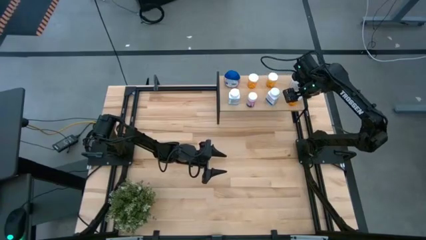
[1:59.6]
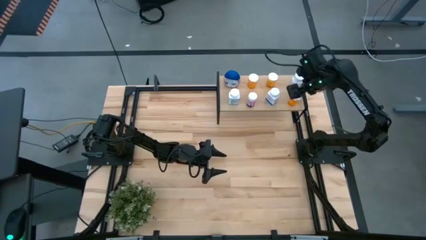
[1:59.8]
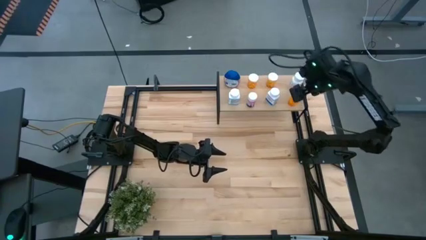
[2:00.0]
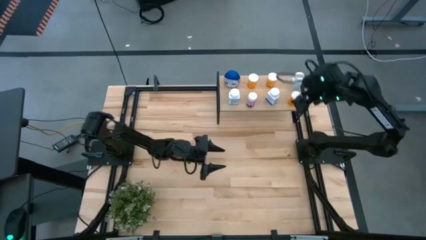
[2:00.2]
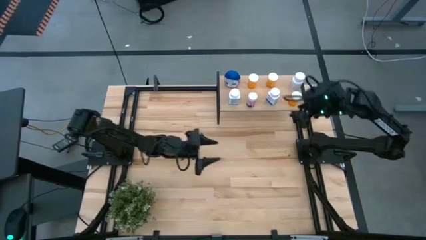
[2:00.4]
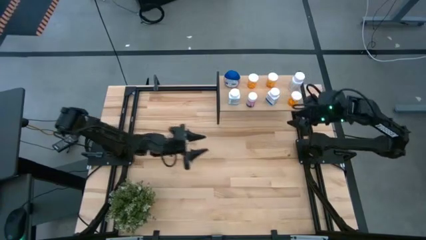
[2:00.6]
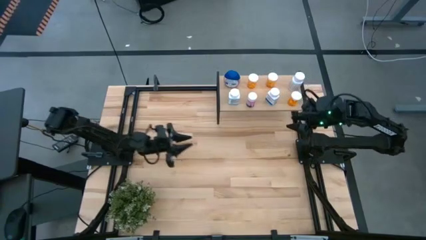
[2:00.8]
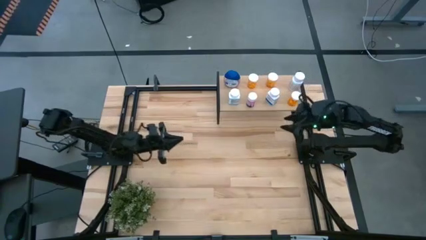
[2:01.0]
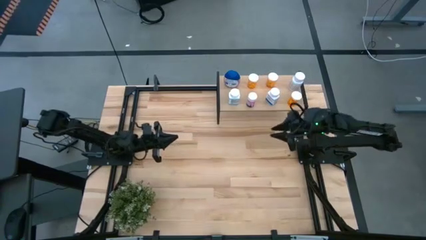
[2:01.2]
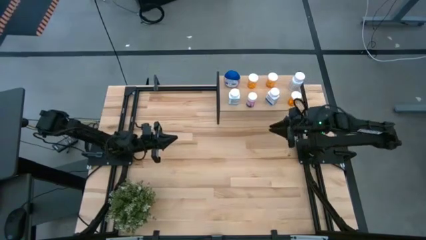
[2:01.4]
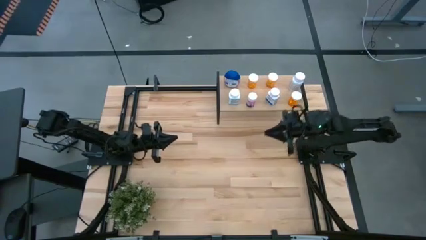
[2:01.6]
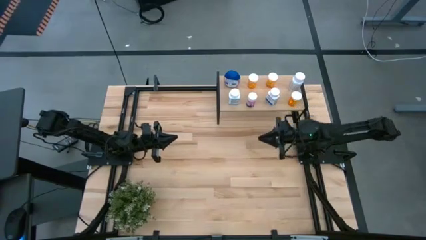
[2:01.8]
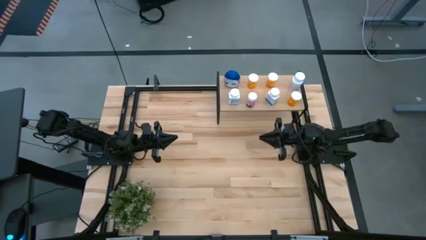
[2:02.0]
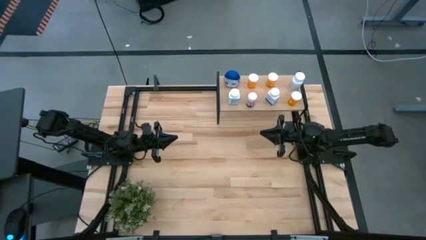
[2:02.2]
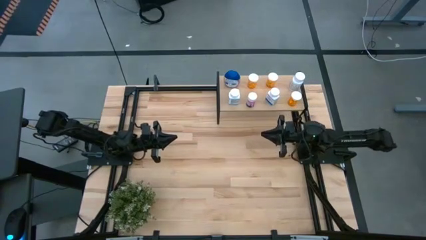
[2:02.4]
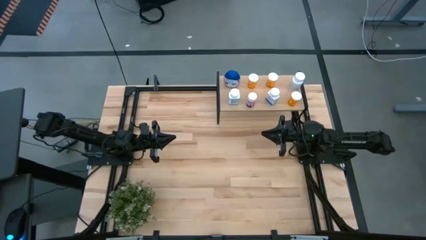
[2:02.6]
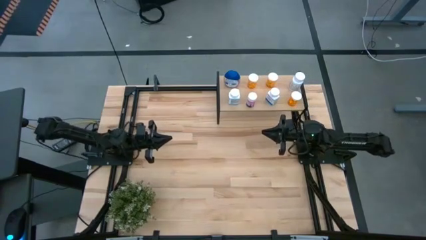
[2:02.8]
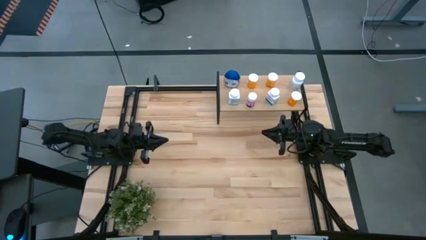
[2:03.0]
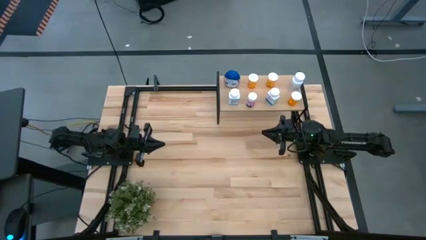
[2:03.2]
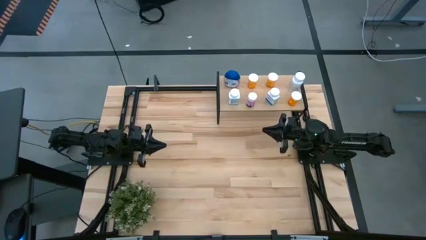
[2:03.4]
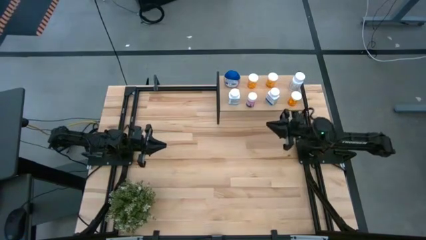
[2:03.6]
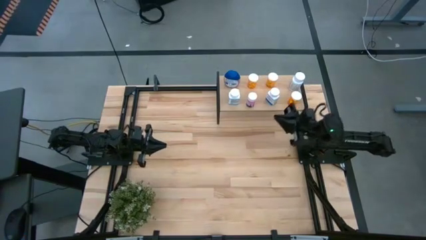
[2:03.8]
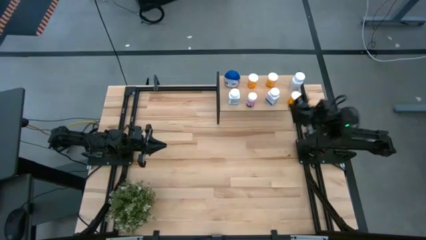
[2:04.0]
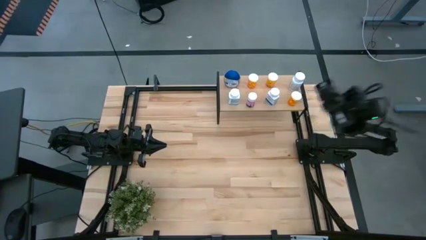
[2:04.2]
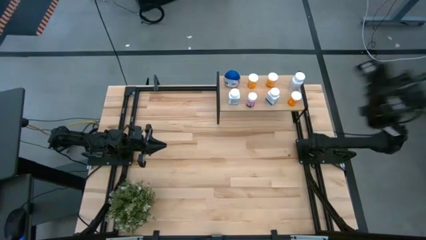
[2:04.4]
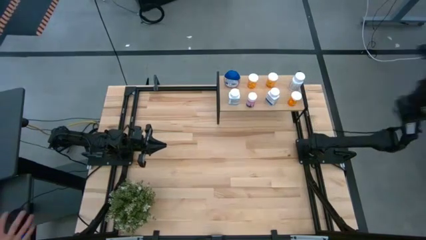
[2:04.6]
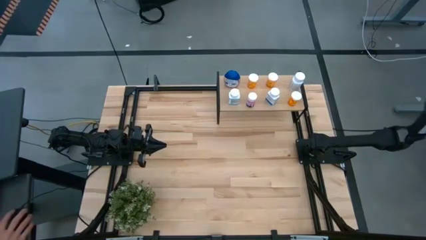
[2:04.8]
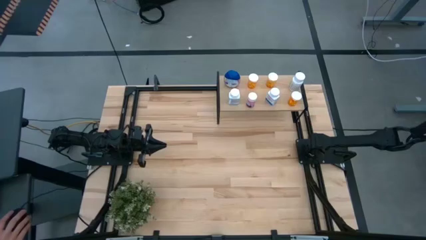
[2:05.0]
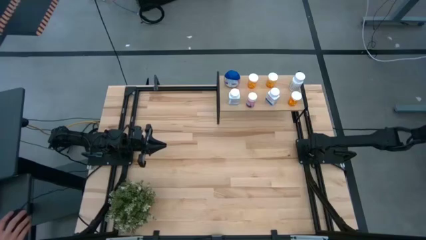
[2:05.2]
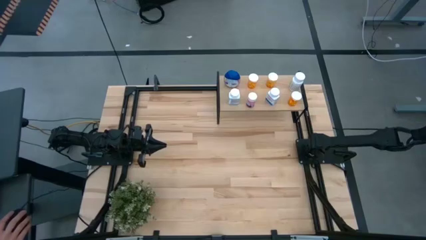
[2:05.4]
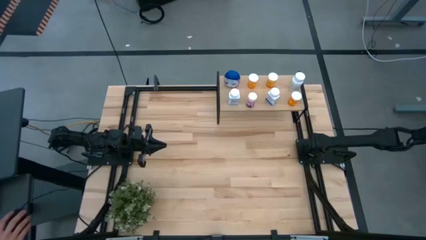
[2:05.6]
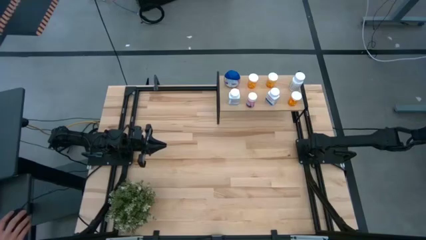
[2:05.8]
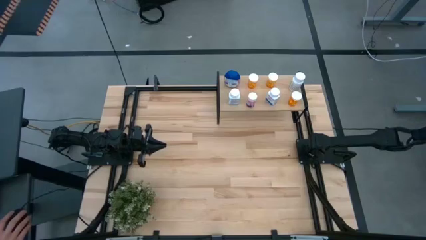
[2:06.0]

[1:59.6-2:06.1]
Task: Pick and place medicine bottles onto shelf by color
Return to Home Position

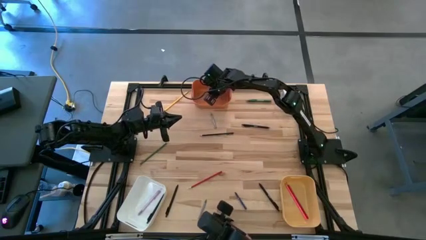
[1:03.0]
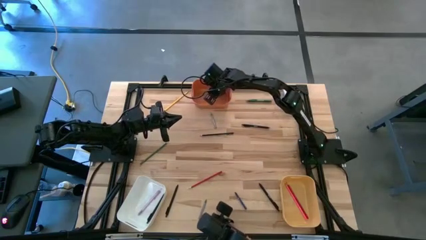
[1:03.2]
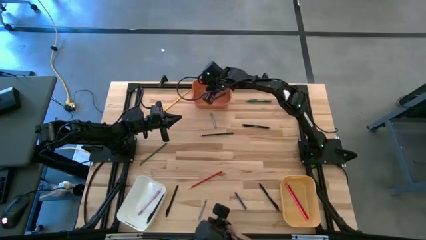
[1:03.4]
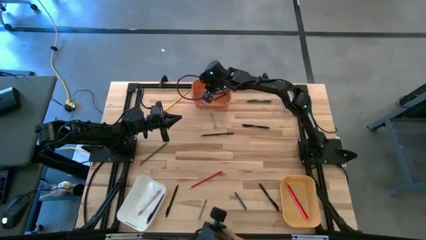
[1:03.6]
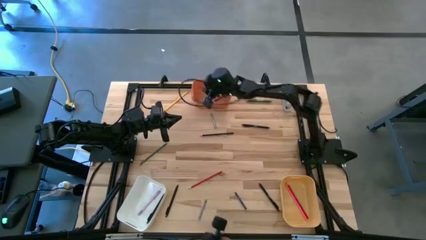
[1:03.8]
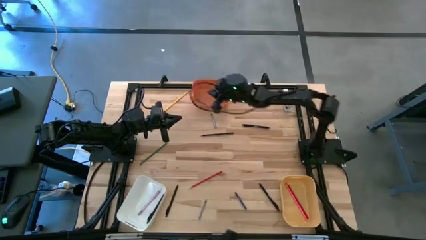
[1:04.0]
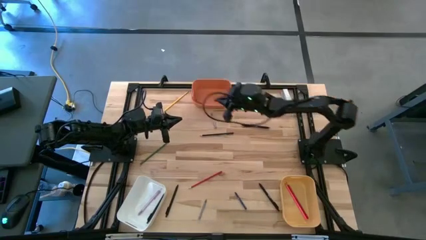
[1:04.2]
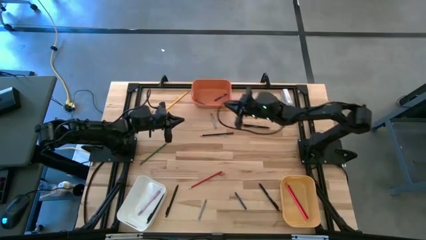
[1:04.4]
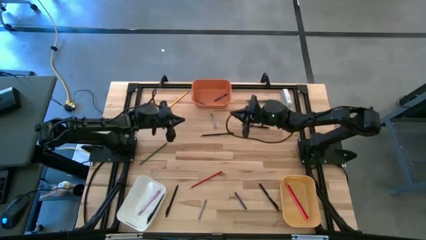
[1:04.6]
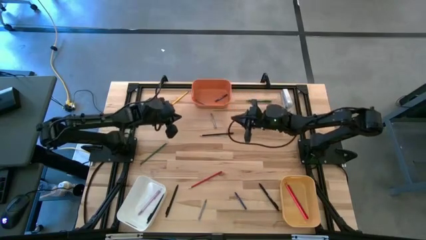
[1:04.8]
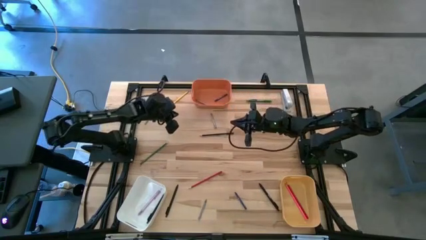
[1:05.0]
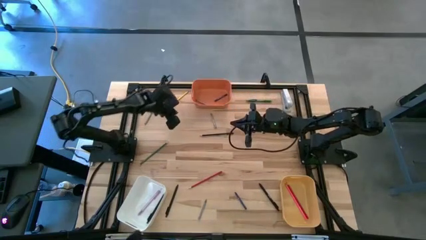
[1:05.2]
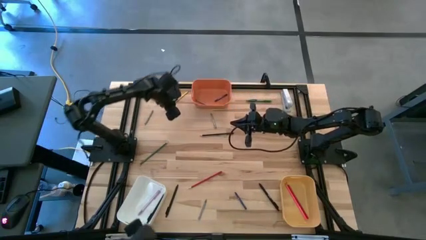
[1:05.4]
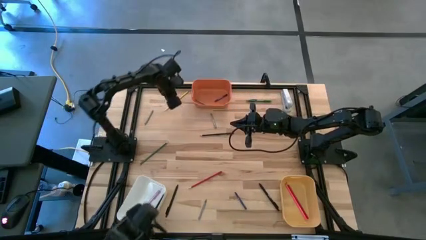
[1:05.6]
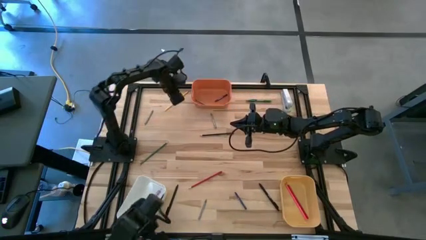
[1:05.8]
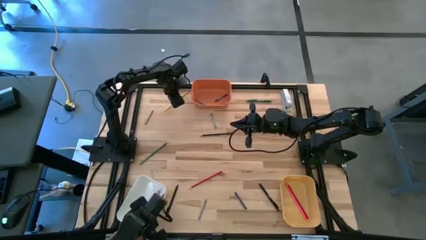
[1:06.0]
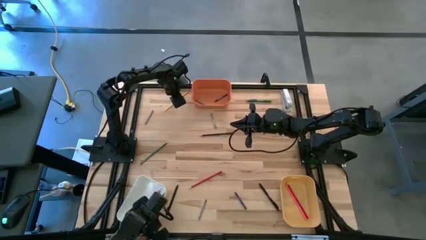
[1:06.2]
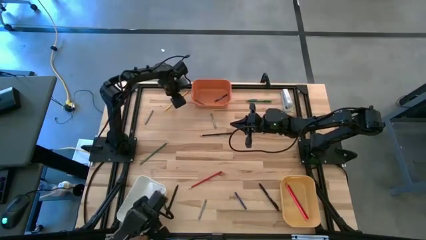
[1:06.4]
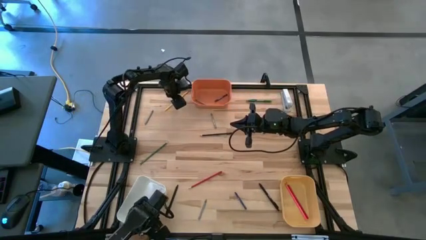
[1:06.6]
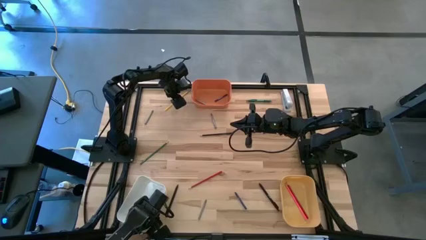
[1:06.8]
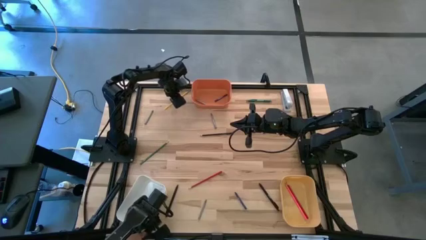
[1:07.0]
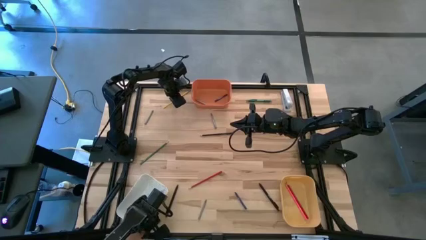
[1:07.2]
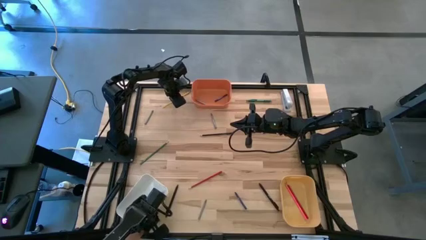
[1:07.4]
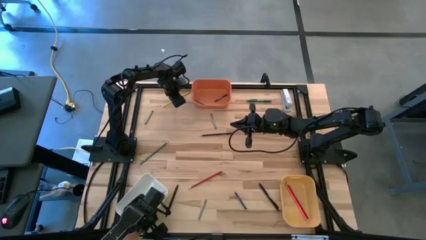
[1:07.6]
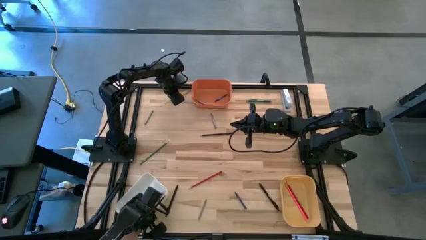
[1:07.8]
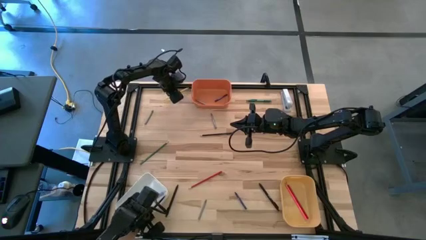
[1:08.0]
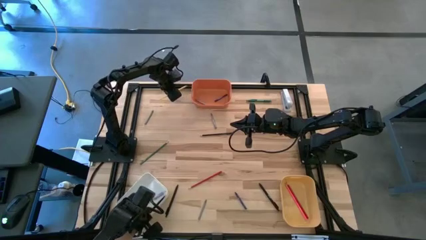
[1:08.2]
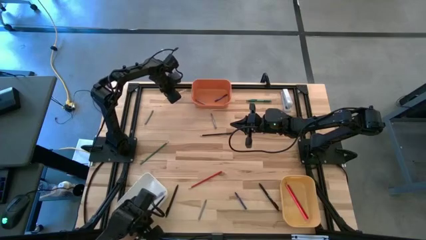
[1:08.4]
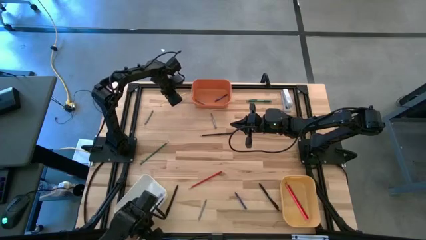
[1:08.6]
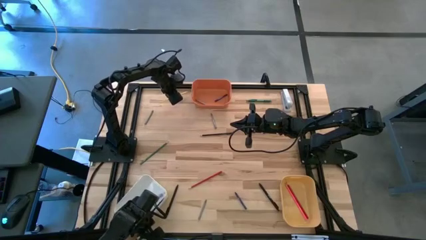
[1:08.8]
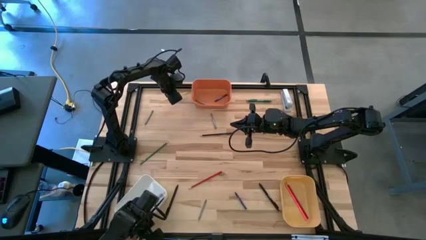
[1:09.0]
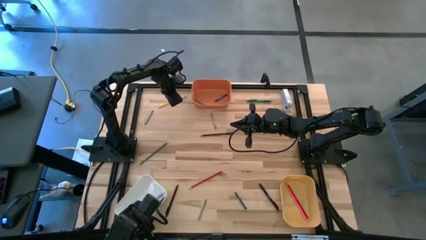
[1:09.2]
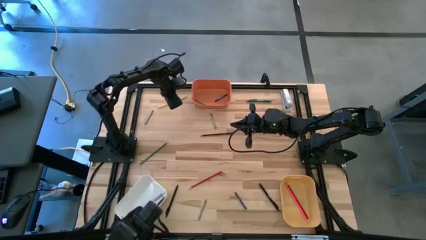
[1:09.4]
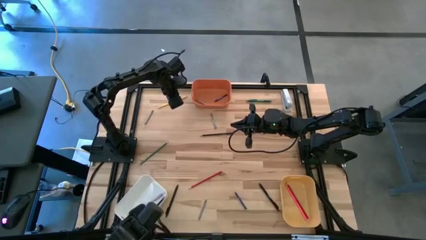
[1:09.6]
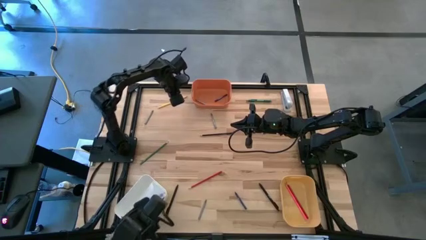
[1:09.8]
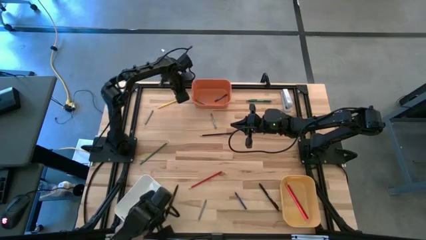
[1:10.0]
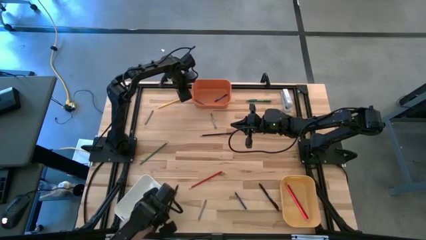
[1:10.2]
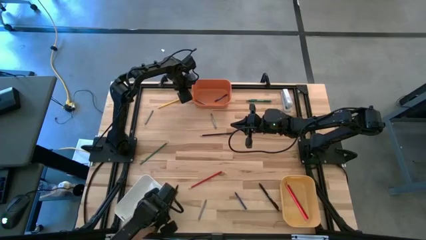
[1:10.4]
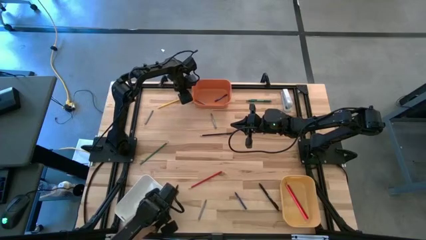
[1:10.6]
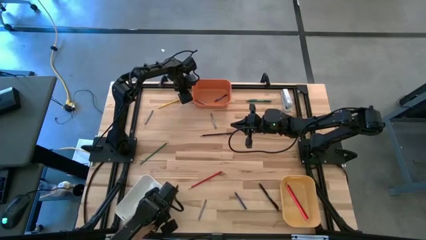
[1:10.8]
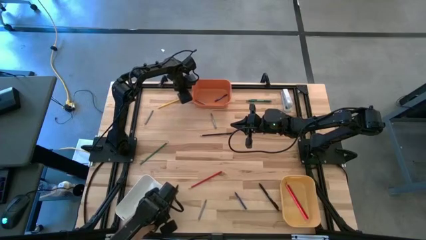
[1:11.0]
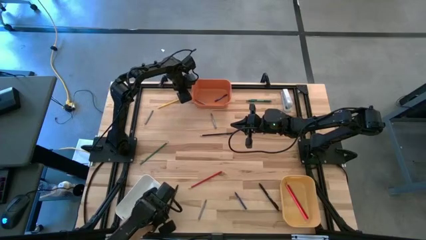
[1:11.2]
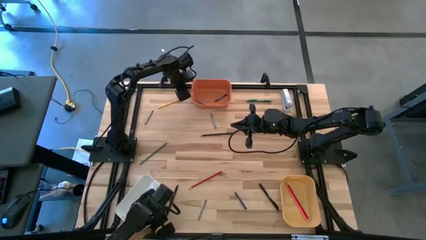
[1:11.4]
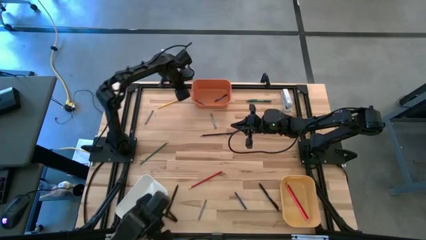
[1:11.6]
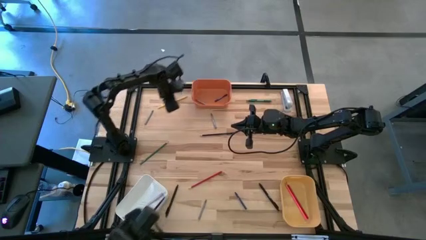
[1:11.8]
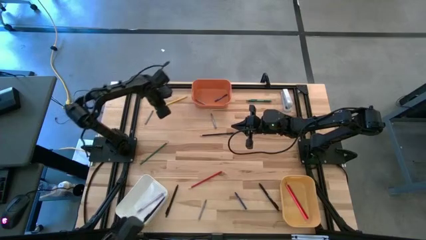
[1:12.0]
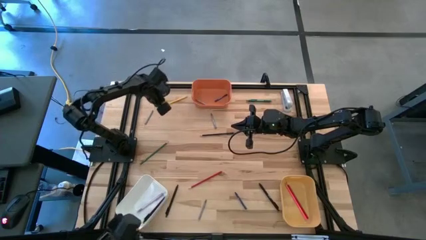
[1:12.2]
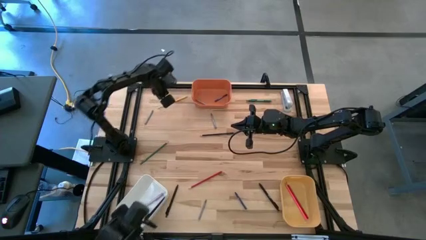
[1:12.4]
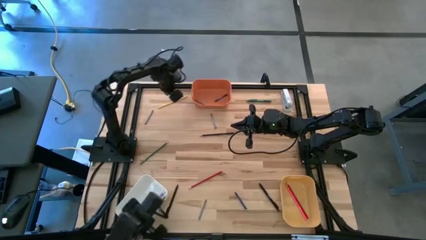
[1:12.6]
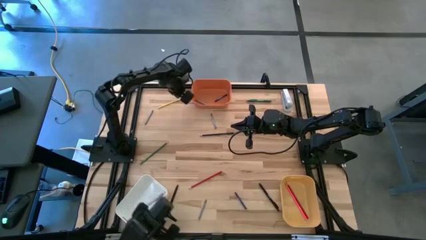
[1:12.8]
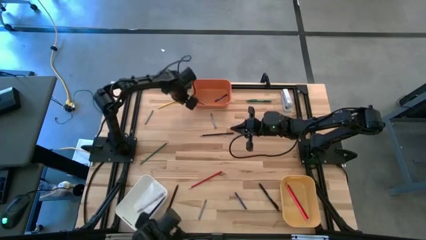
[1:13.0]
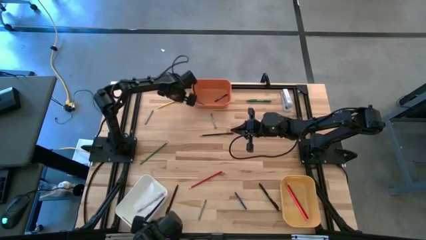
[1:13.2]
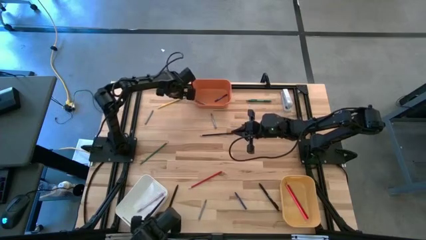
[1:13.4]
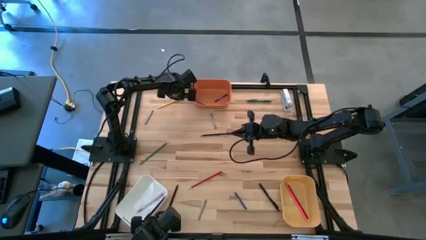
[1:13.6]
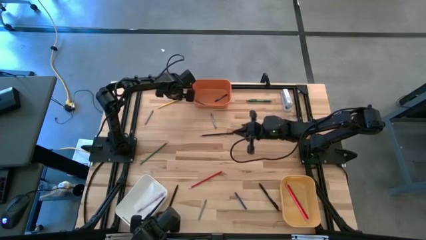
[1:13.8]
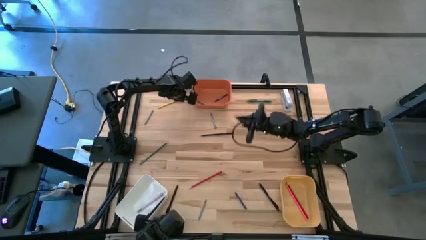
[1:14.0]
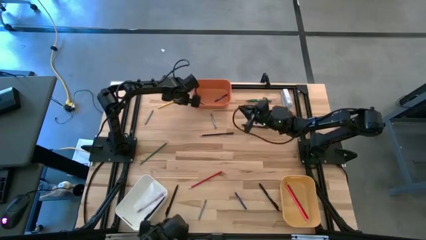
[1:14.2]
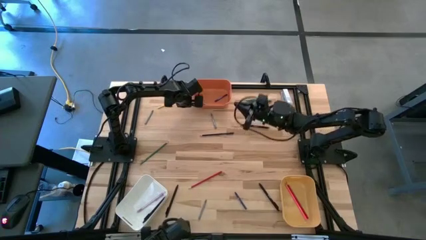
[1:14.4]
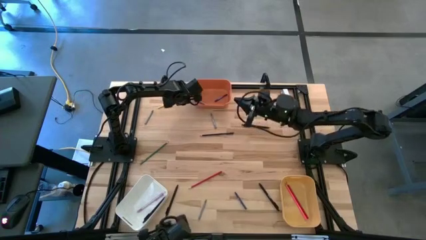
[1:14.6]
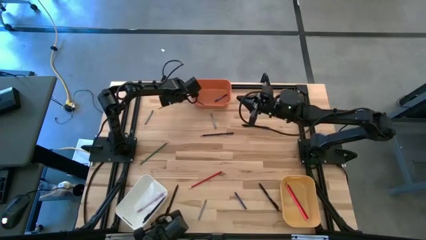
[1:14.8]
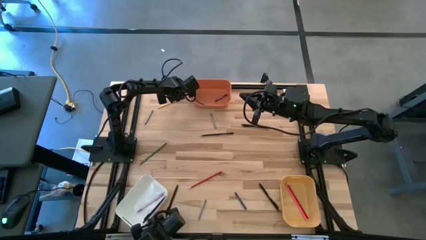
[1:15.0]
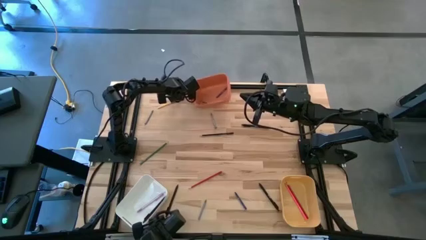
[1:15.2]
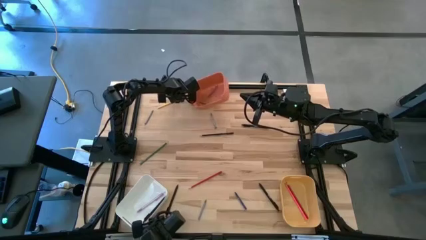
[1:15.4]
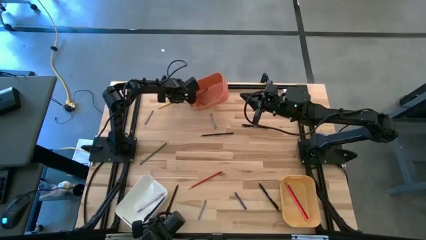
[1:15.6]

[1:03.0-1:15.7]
Task: Sort crayons/erasers/pens/pencils in bins
Put the yellow pencil into the yellow bin
